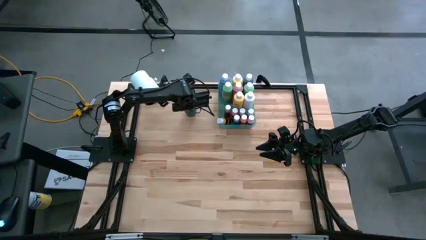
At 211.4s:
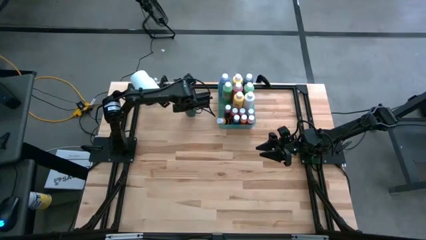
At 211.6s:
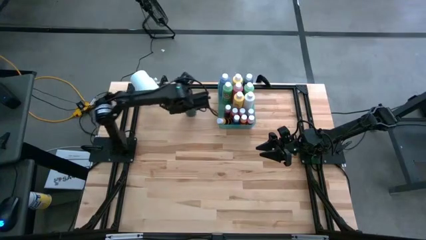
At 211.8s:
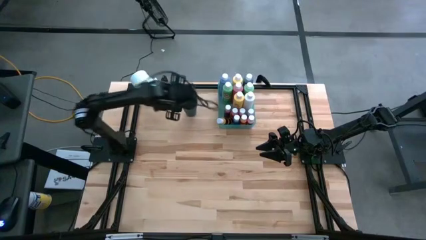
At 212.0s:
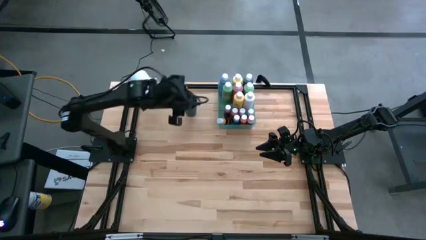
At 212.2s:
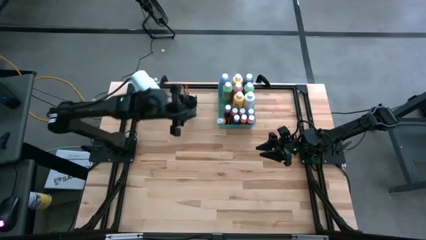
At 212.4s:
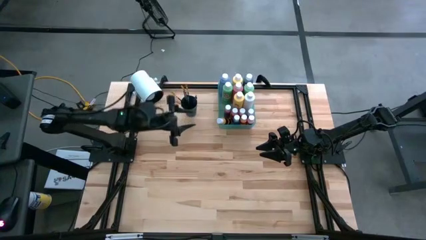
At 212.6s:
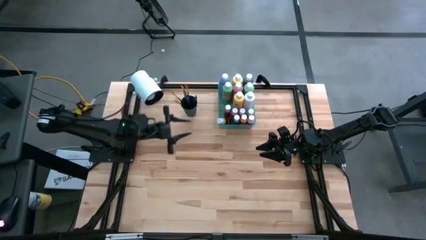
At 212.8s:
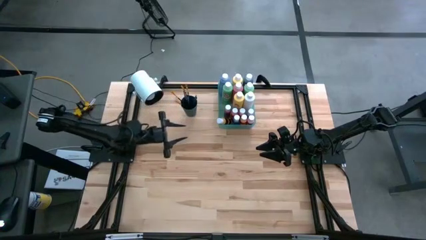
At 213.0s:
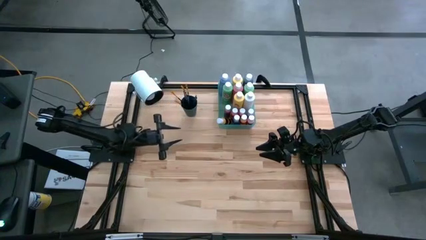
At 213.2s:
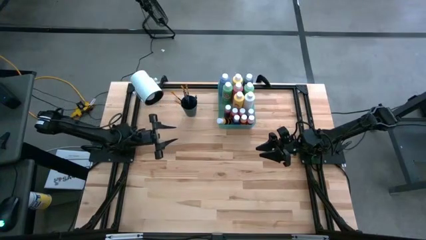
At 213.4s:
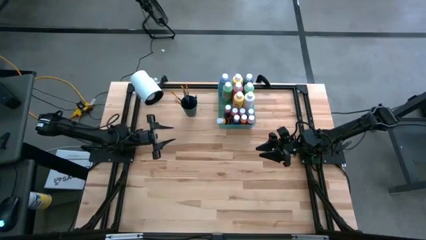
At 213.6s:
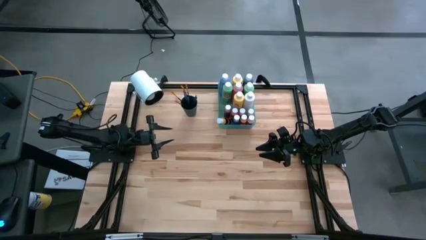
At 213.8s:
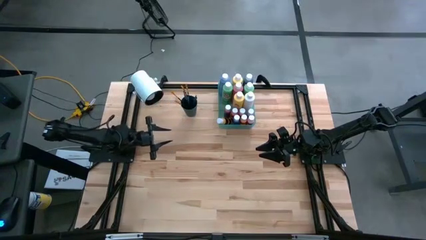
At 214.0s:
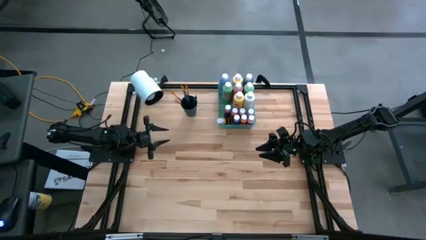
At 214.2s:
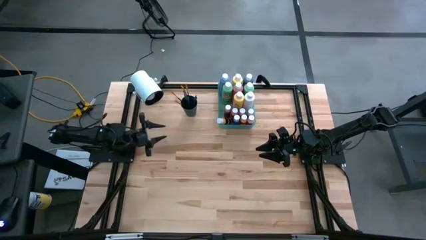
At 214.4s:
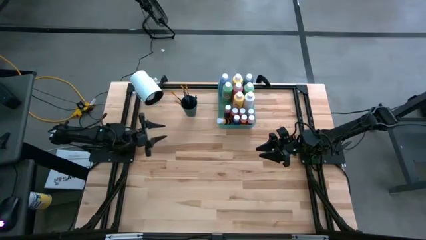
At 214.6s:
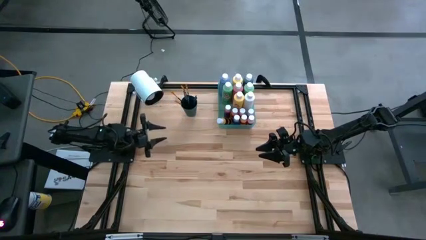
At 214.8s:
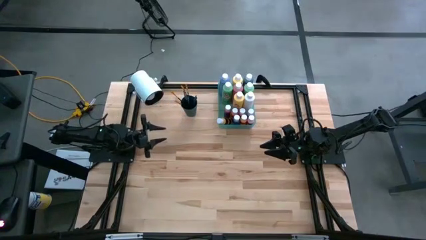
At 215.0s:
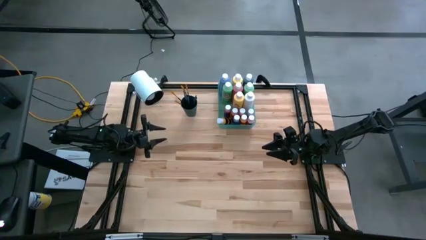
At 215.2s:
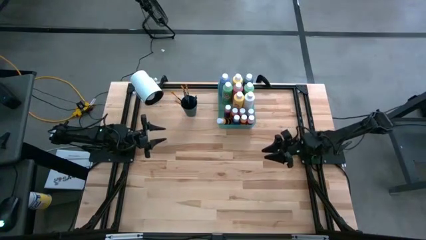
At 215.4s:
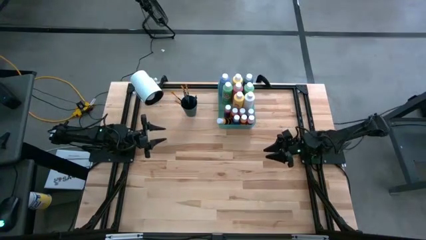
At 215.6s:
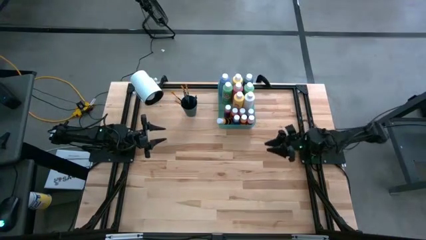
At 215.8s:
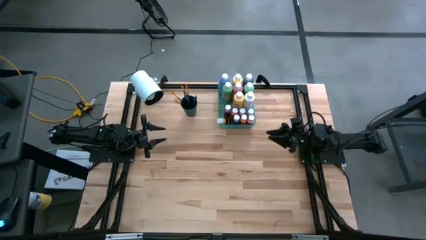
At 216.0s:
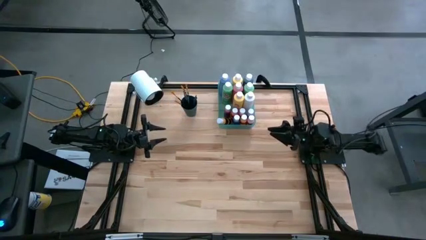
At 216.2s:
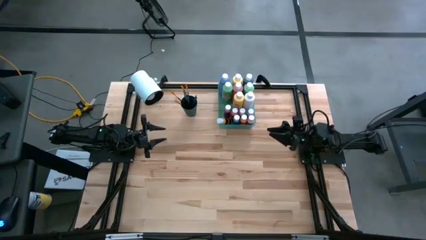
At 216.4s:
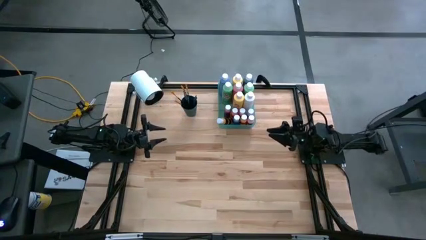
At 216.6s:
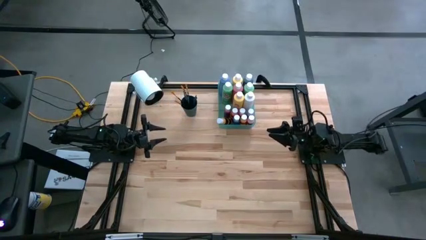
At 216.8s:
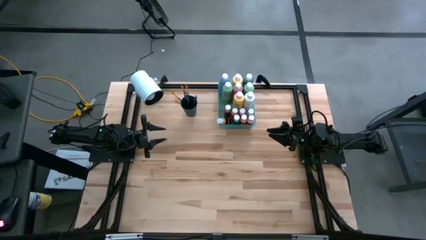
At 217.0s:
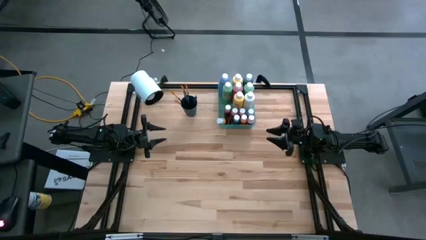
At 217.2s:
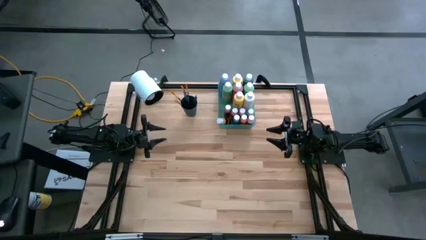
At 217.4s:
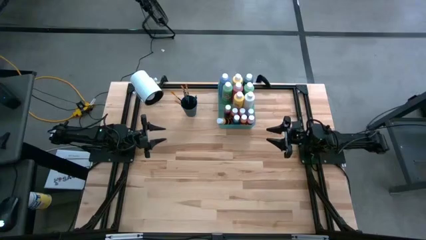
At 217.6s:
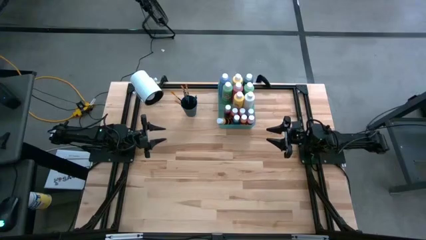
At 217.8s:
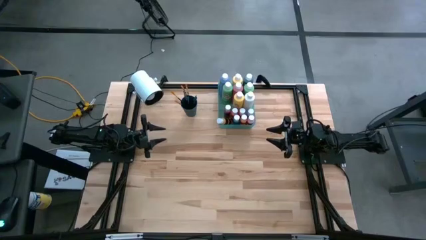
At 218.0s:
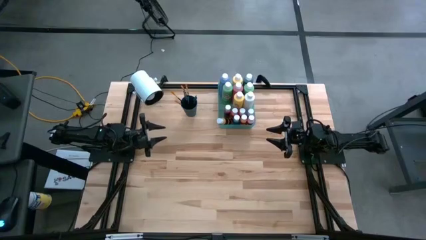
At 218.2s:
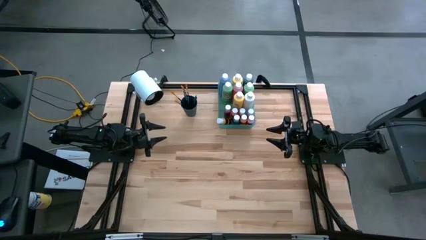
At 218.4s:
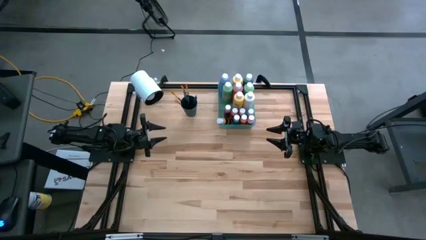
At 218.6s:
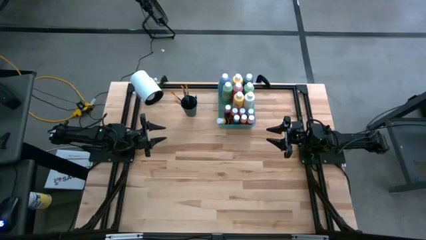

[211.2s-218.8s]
Task: Pick & Place Paint Supplies
Return to Home Position

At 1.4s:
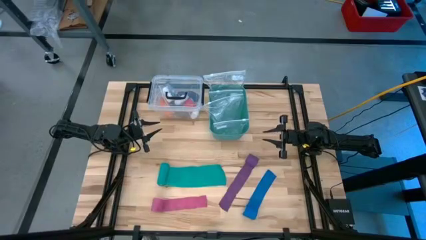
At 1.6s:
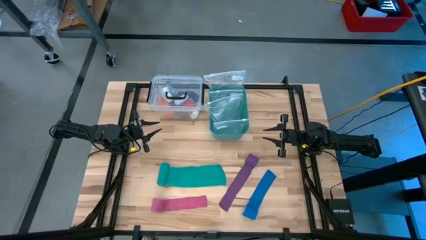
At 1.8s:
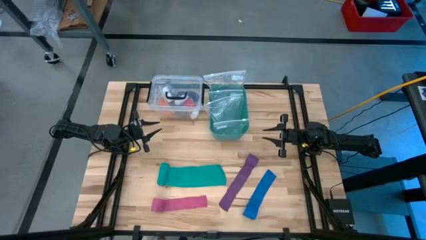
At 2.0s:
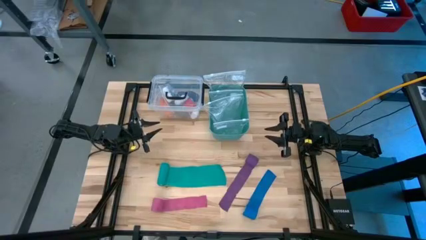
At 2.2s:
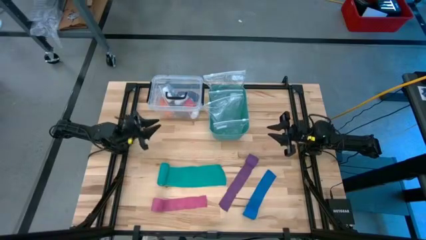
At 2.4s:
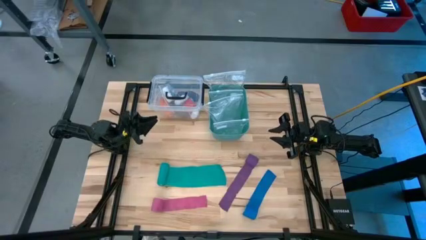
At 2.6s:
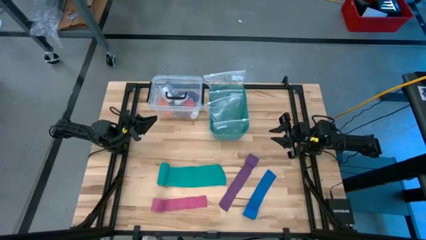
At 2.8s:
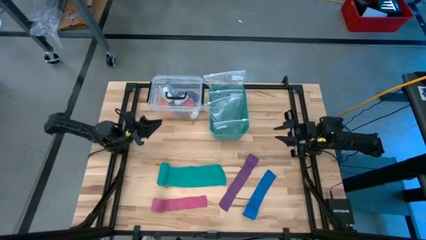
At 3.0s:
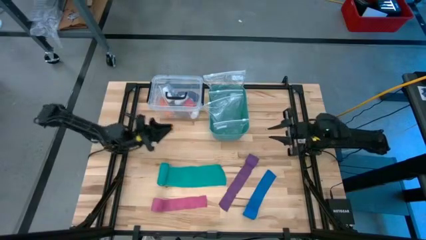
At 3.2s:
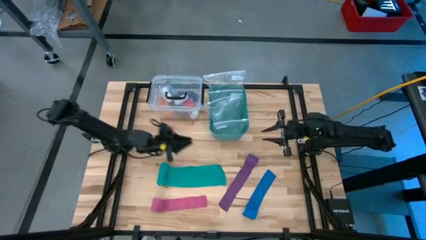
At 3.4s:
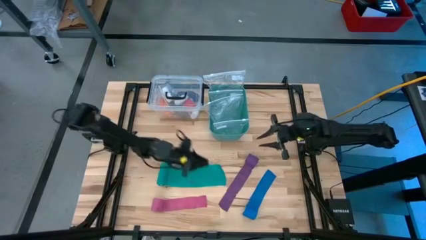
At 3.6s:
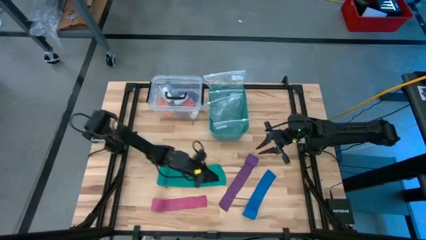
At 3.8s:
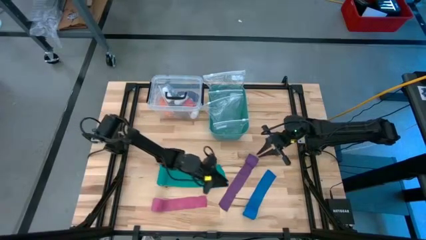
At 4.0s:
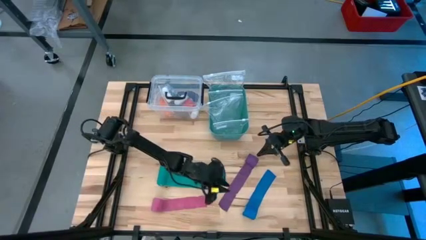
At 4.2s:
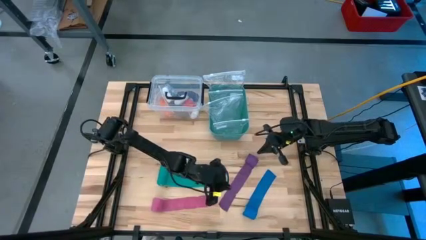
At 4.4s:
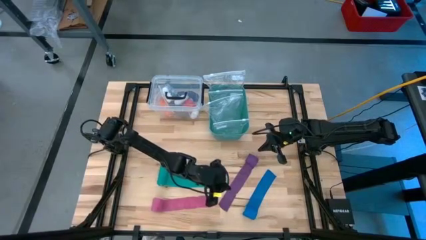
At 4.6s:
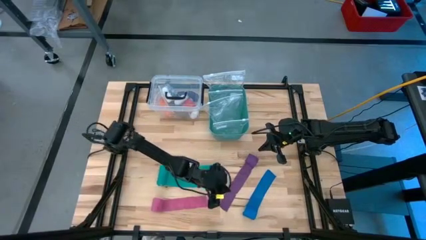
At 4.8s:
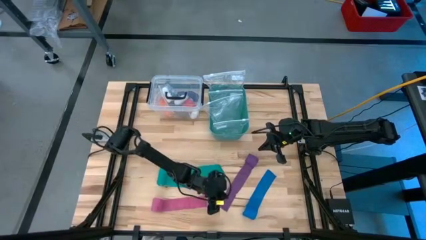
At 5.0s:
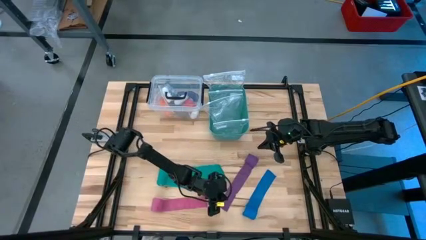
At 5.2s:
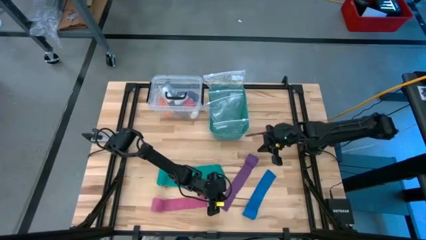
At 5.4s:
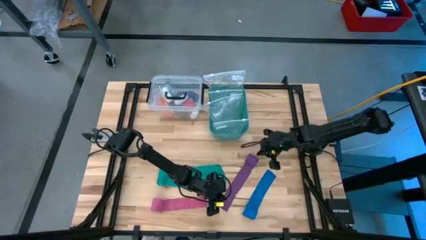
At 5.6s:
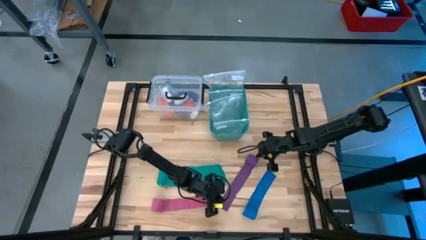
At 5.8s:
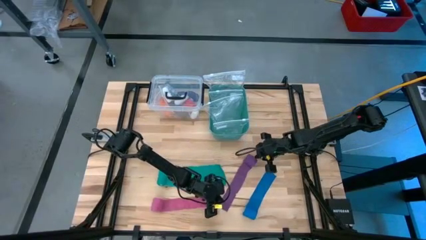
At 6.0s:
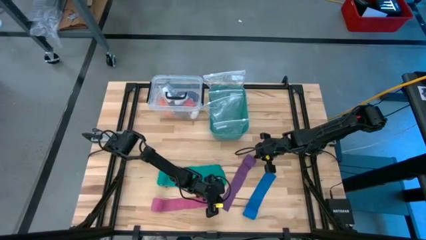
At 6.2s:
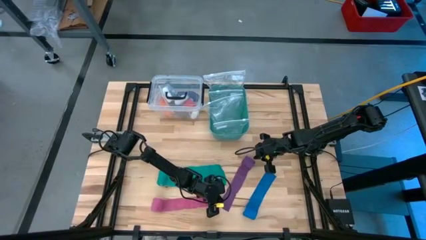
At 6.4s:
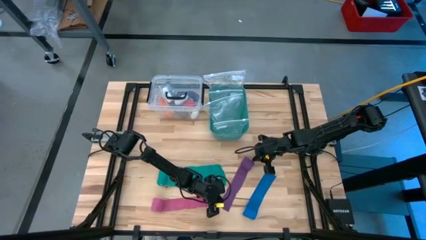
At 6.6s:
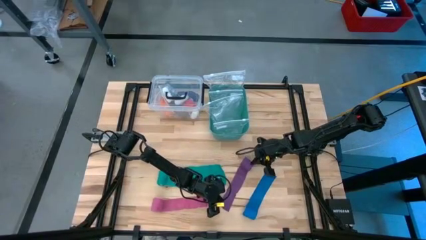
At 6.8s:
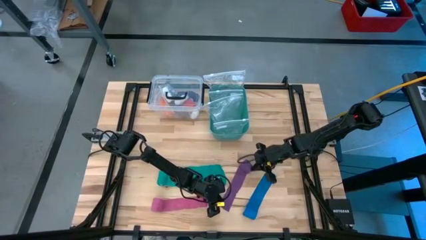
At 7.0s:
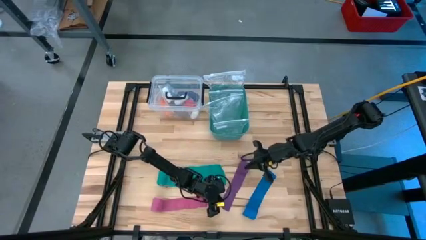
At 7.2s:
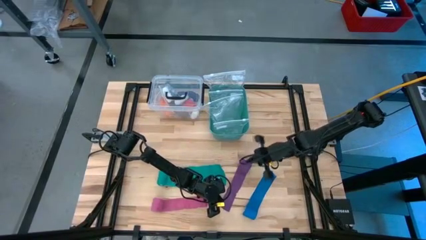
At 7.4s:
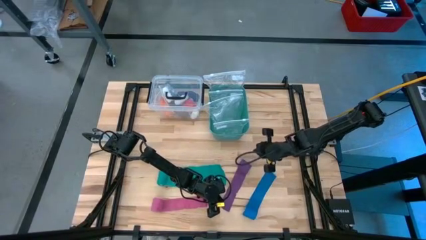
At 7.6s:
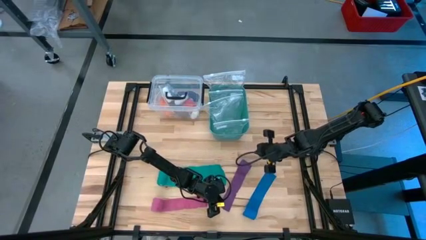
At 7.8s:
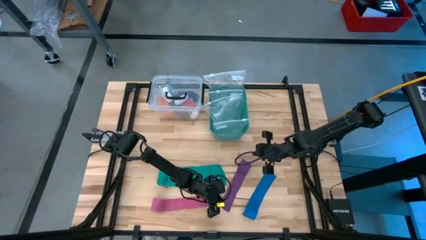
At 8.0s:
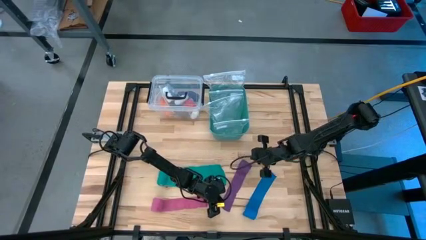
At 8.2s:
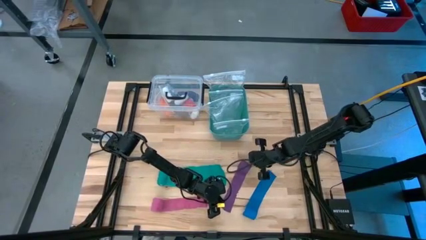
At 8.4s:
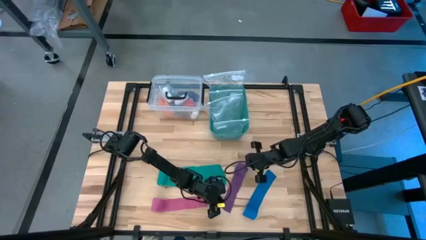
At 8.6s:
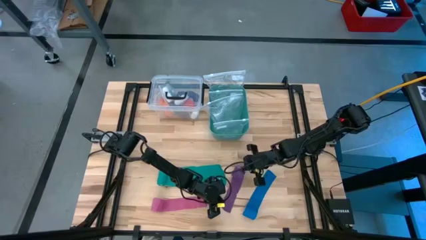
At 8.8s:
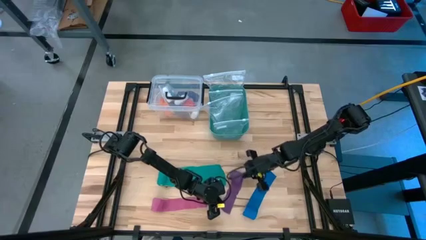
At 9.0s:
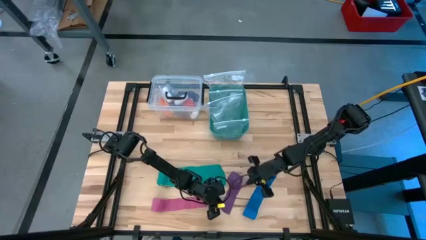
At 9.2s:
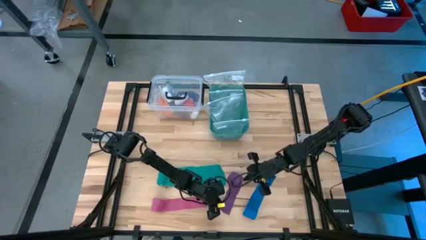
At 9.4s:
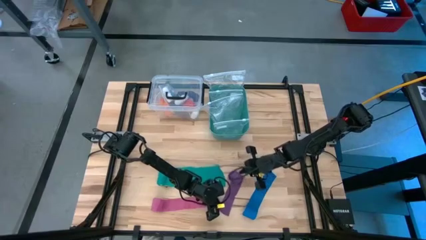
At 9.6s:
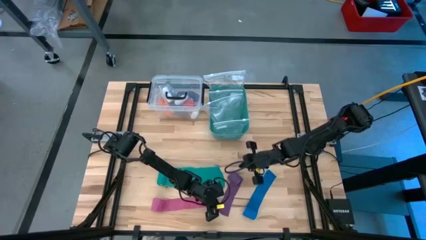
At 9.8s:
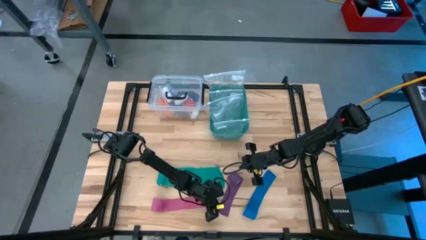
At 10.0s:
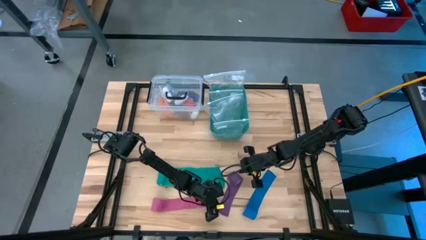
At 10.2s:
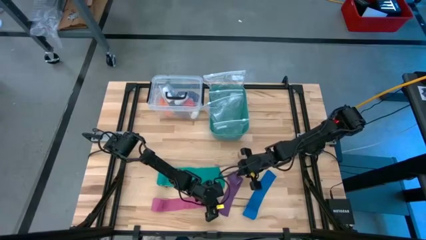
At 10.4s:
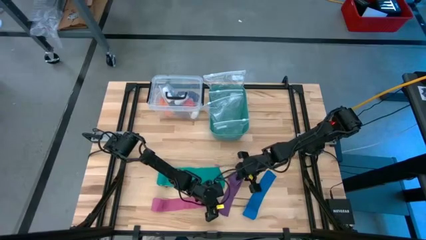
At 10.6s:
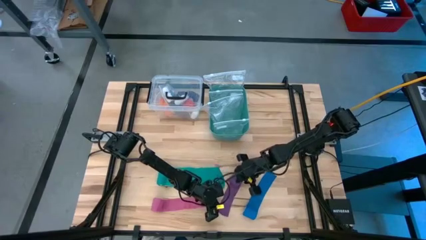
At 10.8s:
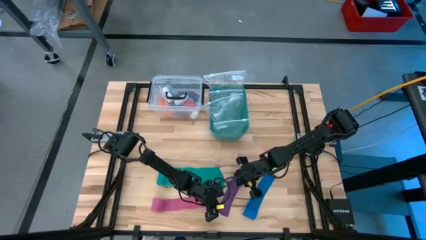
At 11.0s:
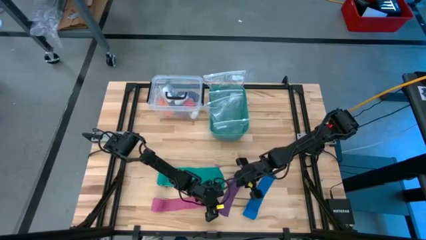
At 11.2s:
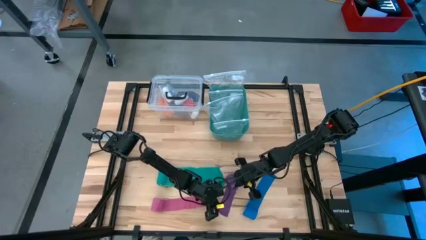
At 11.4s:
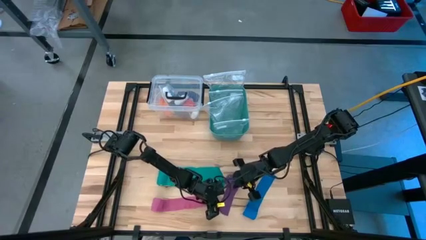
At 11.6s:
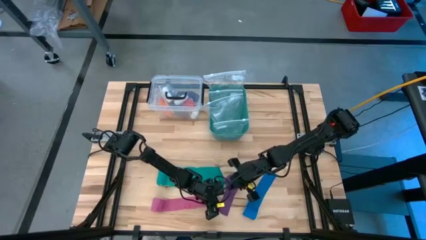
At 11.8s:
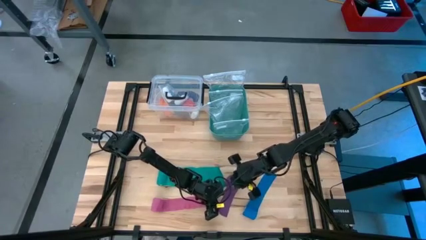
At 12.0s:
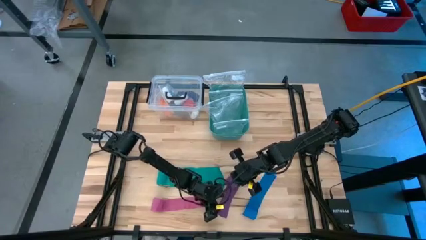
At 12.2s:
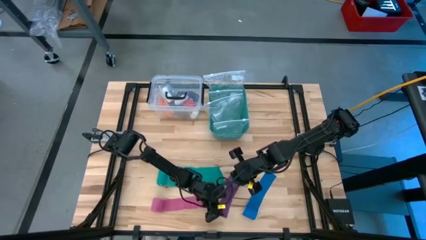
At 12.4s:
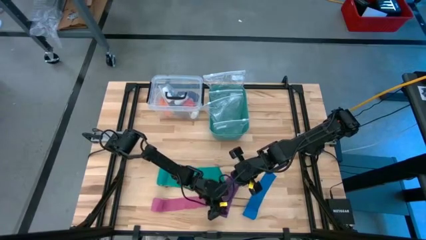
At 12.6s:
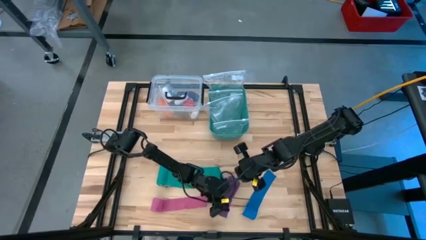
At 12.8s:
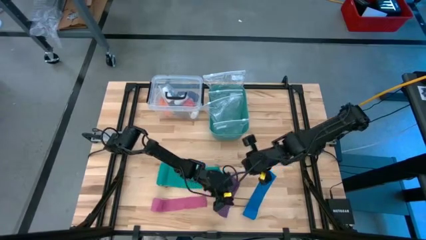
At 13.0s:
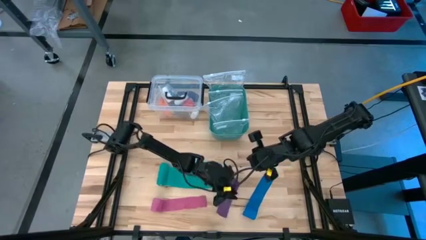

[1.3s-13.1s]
Task: Roll bandage
Roll the purple bandage
